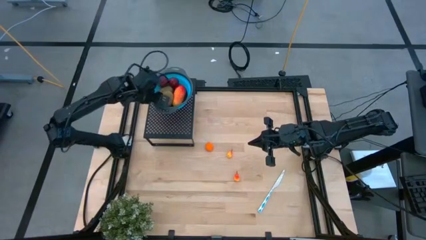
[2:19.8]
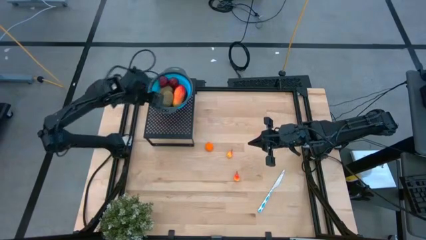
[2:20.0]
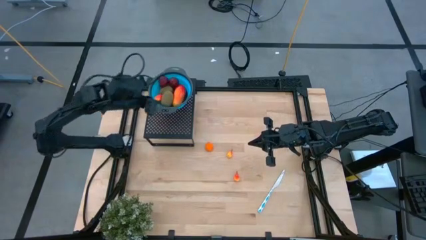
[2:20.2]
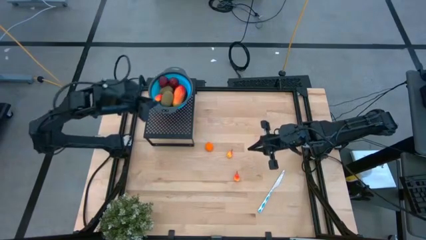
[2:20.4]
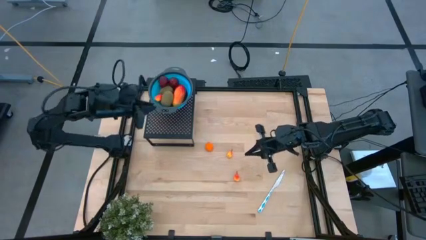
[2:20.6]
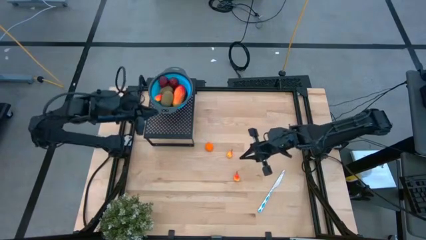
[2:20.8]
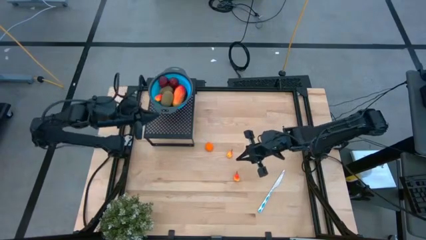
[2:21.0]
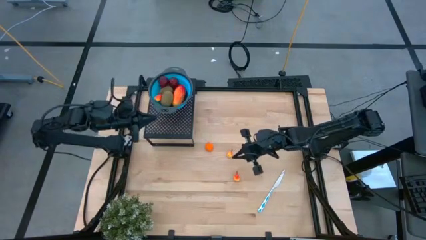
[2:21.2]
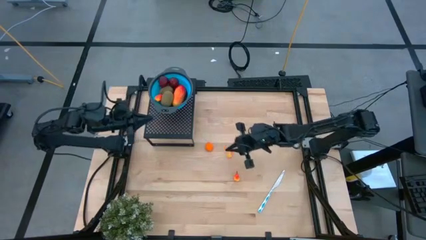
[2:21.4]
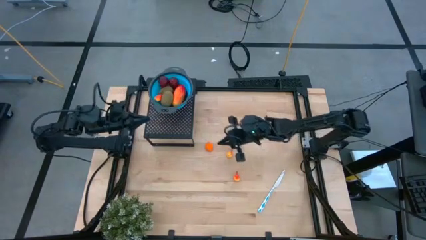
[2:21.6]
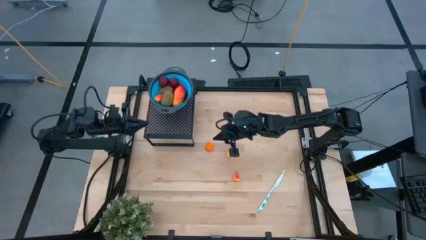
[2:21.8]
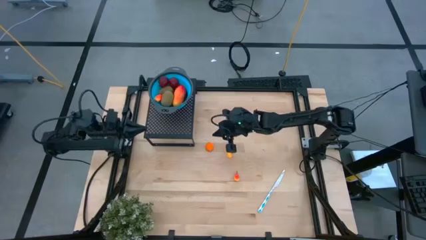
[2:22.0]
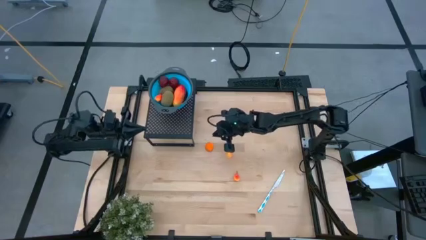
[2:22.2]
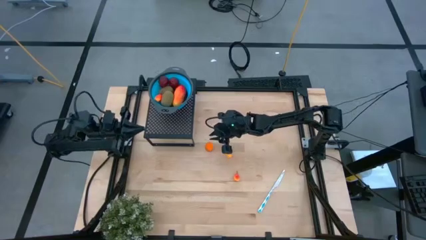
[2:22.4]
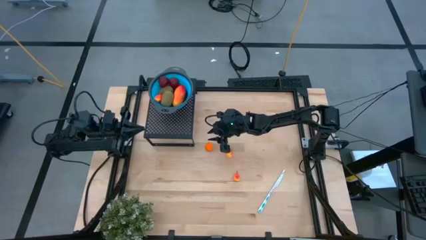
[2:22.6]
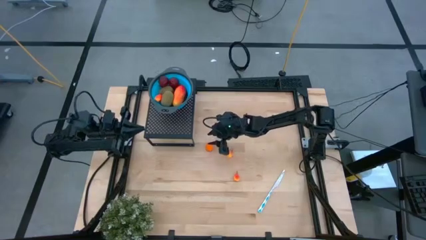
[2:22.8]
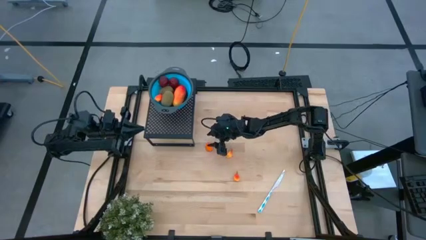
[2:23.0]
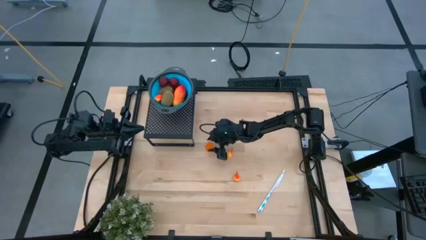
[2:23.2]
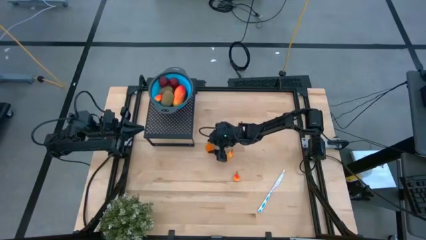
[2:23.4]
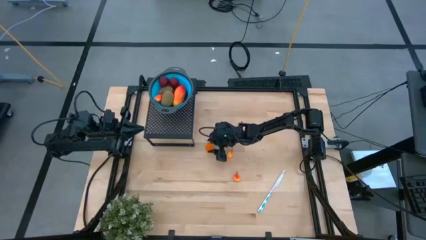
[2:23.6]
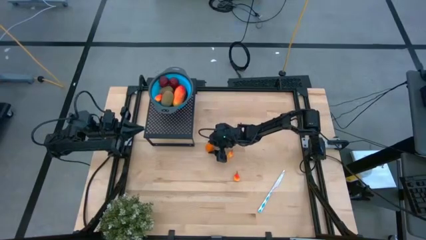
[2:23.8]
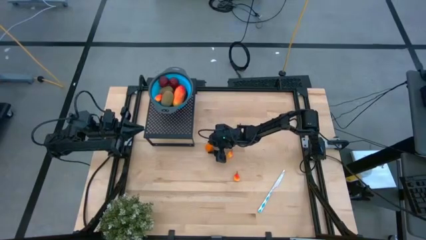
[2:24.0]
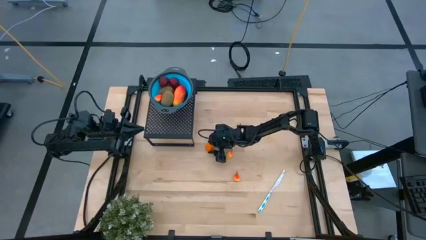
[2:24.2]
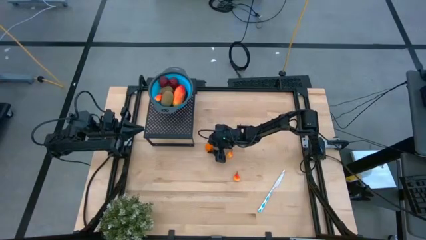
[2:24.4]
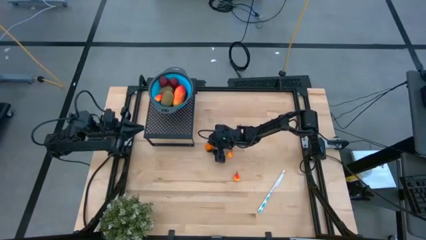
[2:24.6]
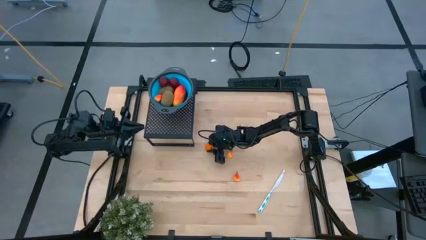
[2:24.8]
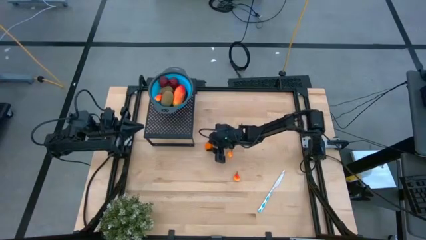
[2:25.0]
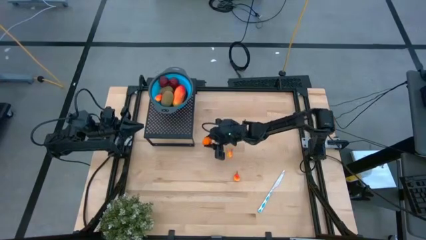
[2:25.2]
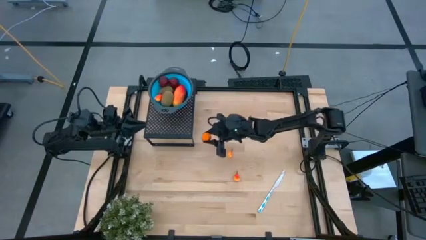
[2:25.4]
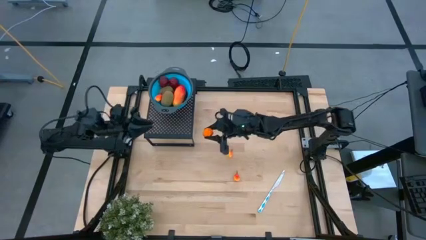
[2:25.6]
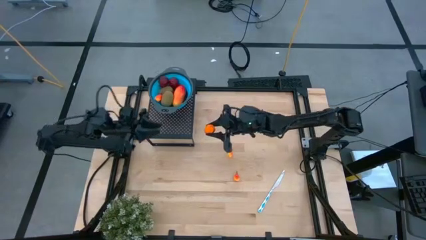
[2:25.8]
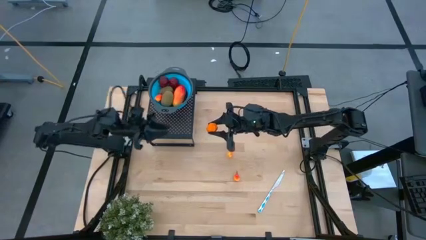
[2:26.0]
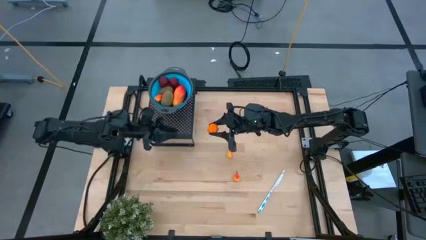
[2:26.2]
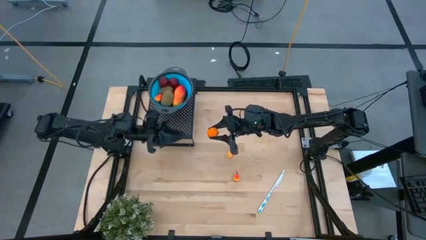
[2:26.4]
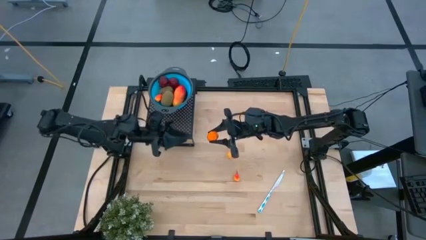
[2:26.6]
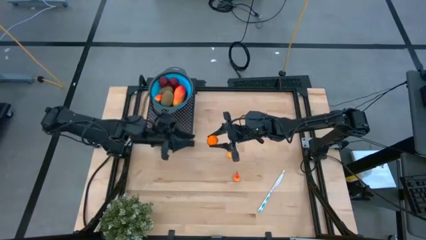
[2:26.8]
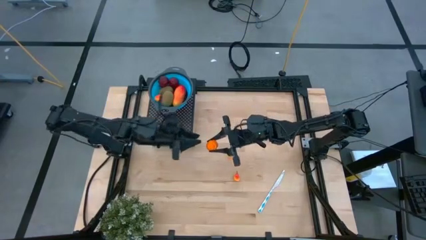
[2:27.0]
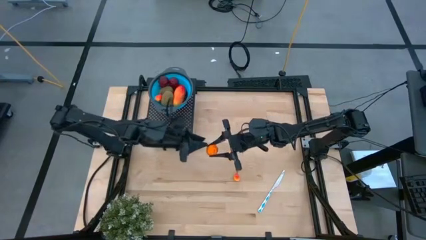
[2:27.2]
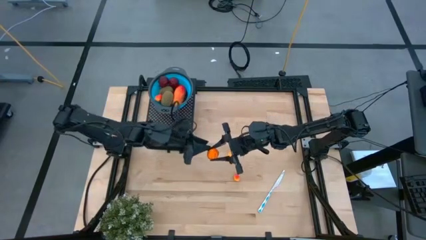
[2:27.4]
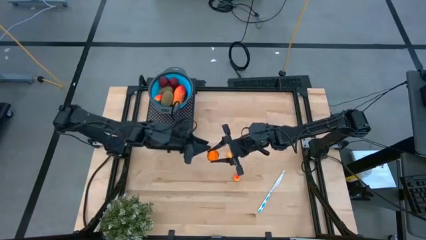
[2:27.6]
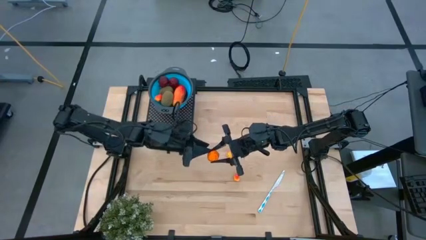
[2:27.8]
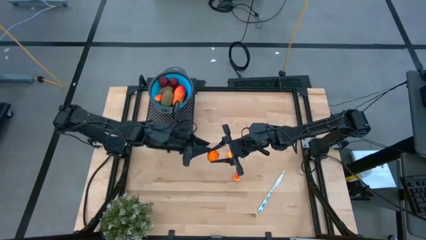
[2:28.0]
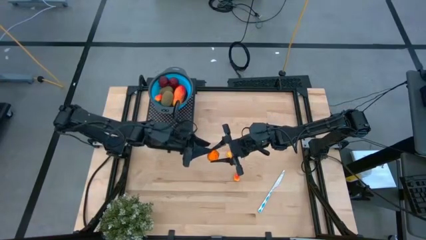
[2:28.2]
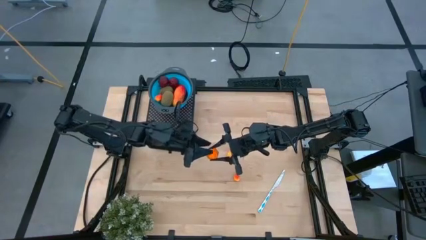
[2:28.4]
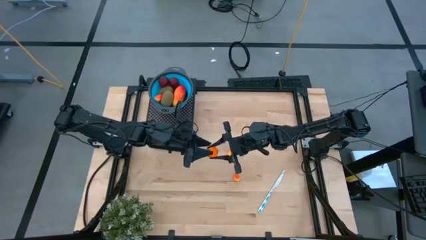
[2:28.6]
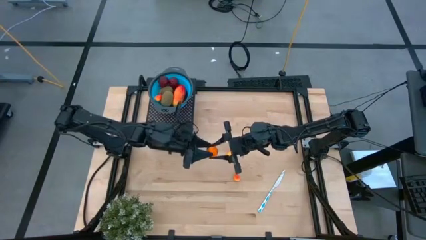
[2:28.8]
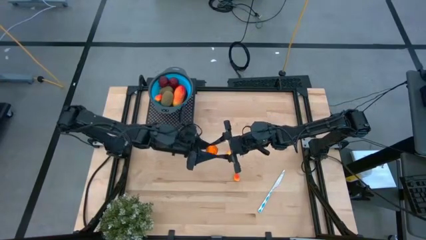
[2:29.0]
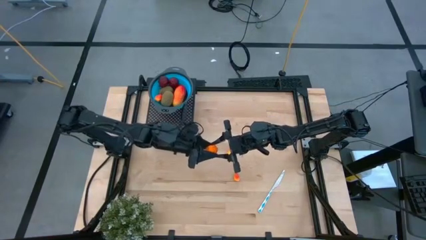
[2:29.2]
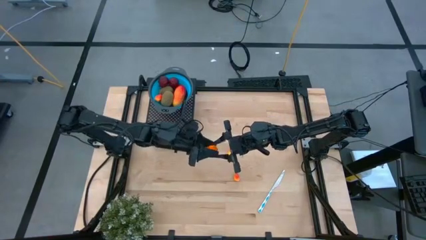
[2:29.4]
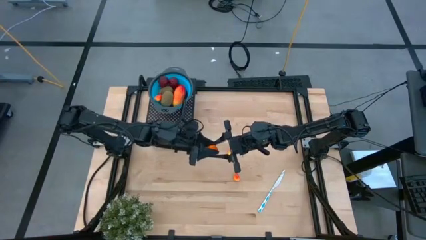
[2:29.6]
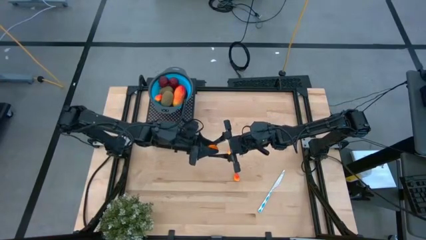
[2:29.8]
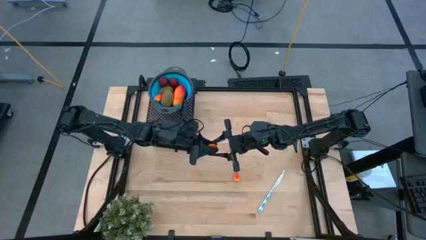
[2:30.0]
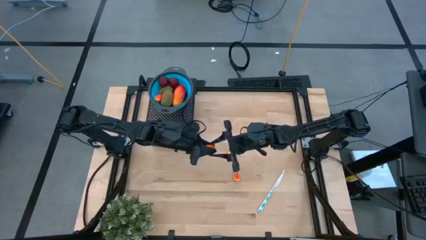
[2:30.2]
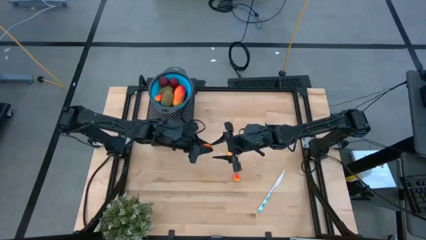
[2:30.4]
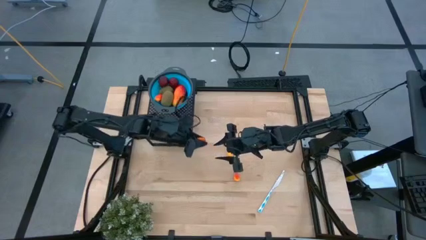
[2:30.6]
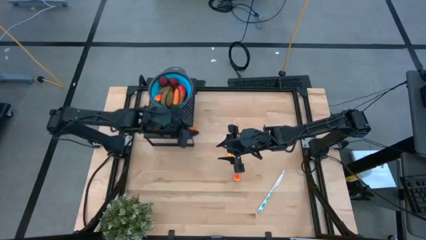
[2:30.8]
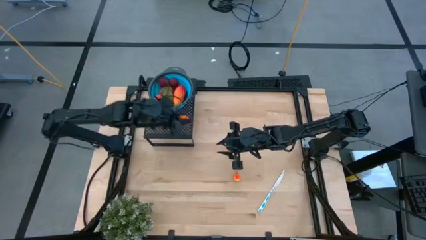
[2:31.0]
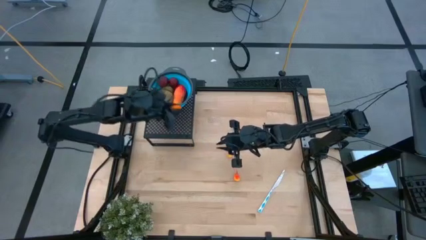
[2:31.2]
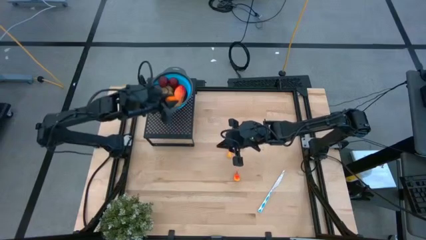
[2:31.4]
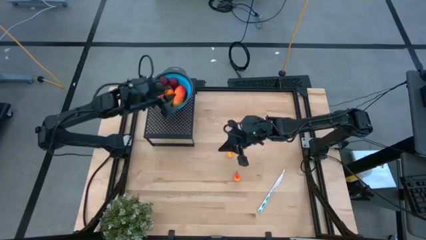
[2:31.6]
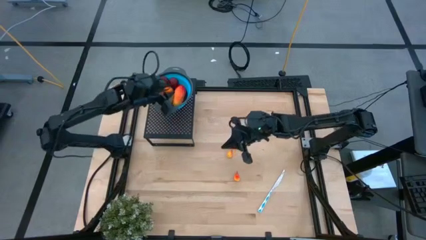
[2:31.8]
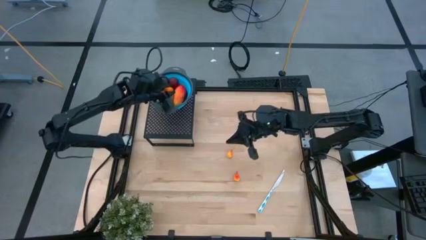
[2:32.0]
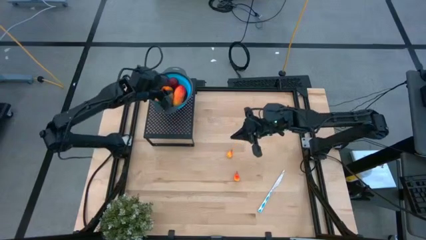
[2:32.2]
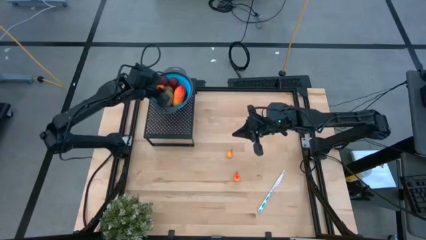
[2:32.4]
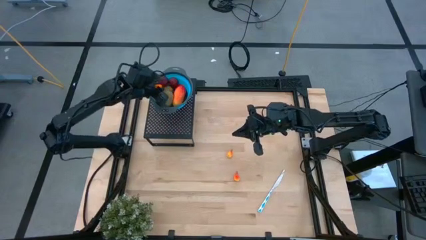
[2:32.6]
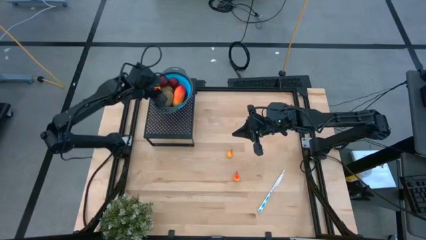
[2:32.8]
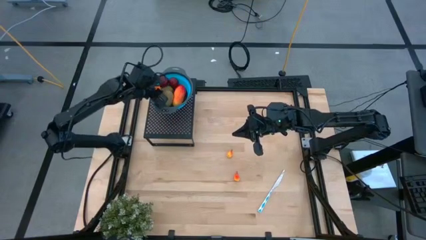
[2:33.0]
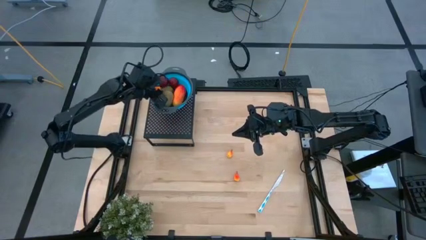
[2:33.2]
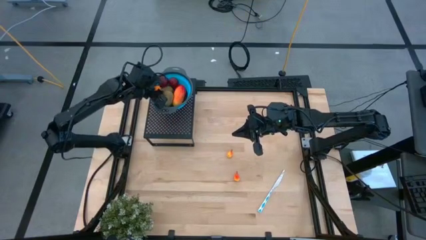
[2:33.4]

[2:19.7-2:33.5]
Task: Pick & Place Fruit
Put the orange into the blue strainer bowl on the shelf

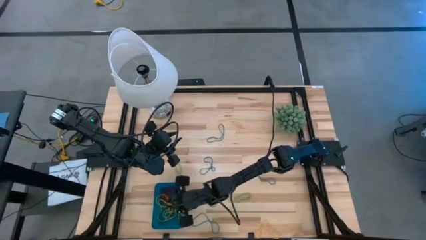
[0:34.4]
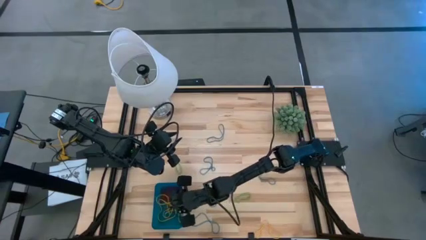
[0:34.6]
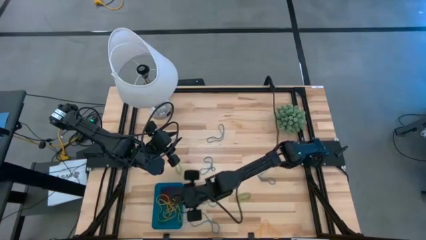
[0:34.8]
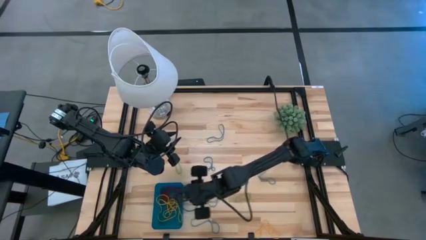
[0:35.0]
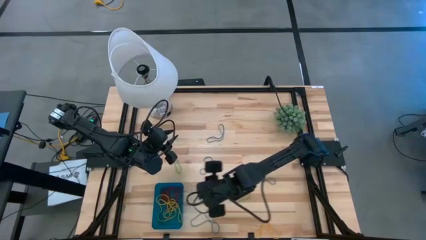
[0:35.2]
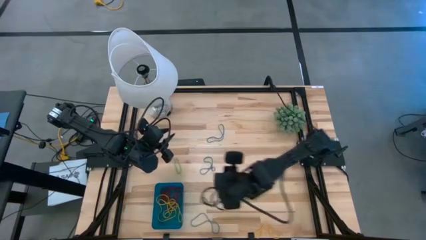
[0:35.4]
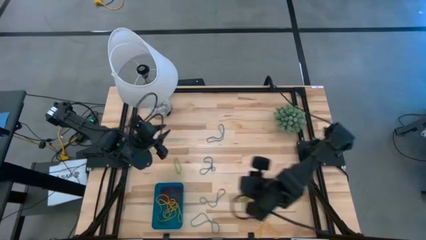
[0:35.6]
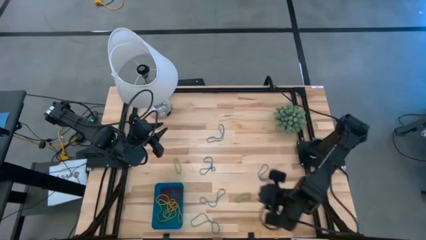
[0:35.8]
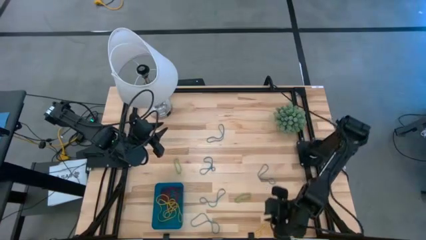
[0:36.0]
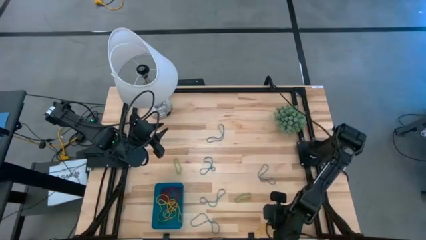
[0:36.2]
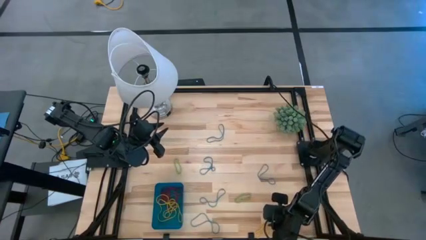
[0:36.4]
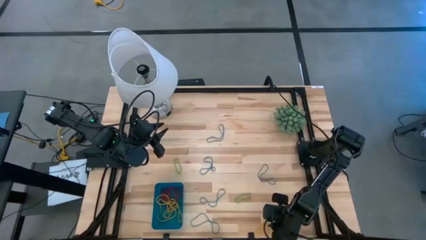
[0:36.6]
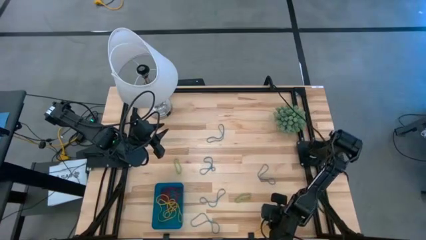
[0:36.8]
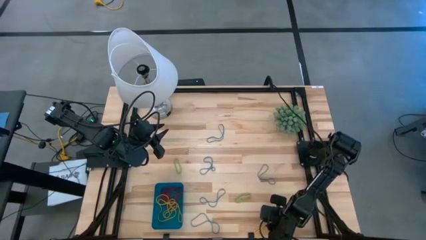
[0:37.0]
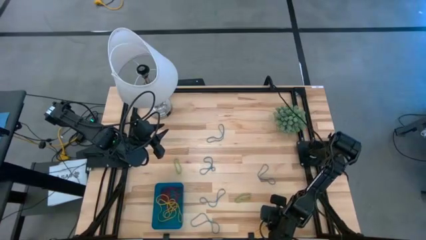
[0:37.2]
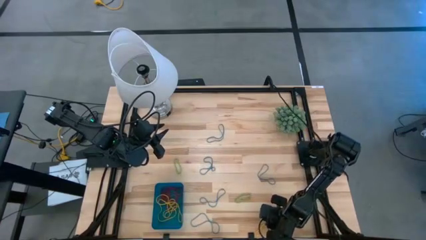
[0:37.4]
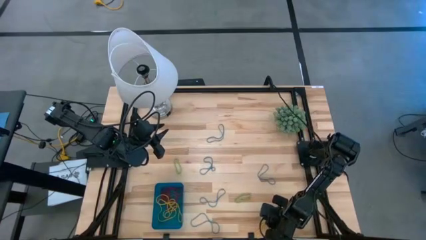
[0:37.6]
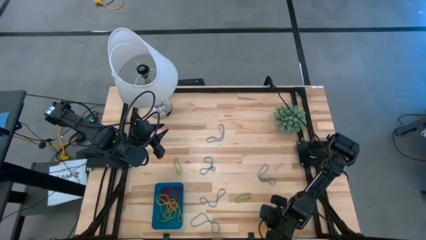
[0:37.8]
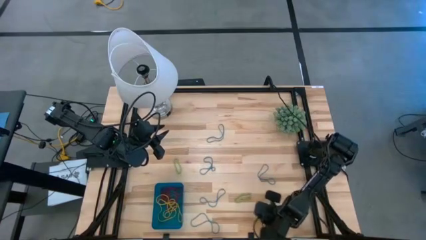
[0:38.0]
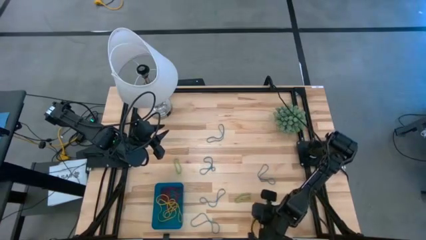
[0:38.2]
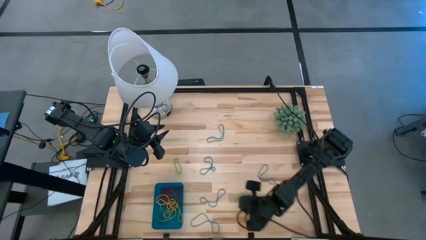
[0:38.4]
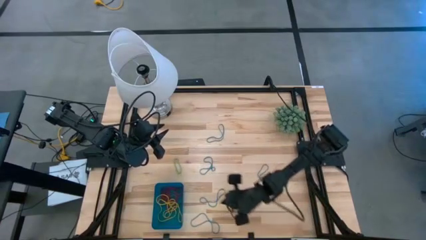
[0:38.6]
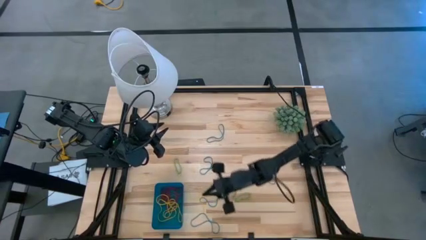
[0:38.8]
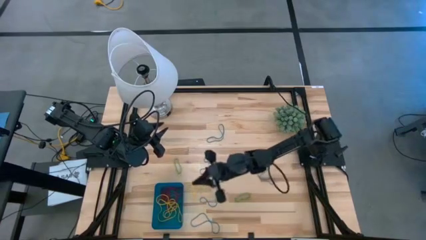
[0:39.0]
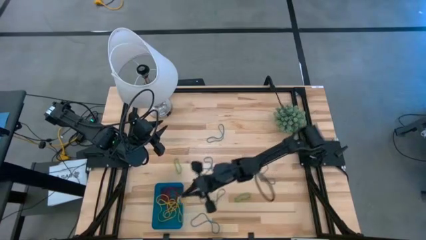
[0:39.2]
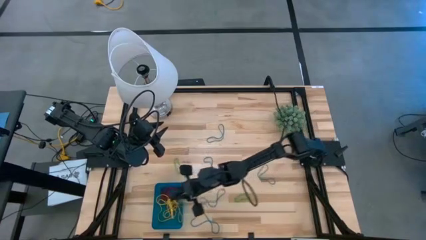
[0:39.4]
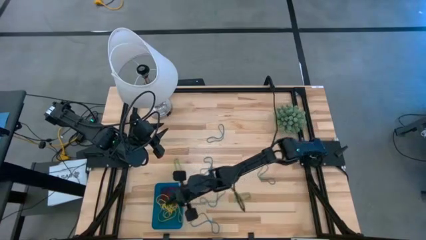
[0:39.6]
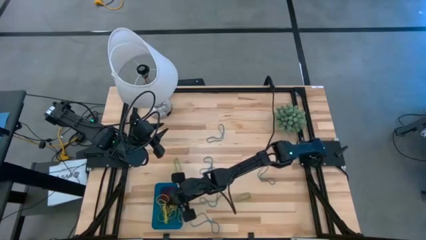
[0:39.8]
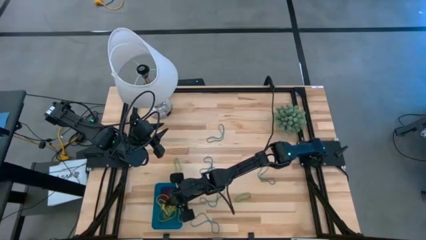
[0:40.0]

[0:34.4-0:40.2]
Task: Pick and place items into bin
Put the yellow rubber band into the blue bin
